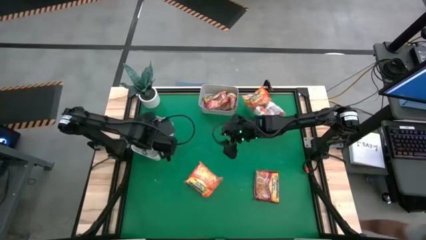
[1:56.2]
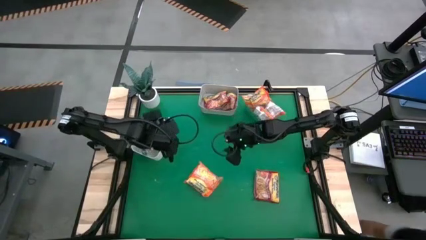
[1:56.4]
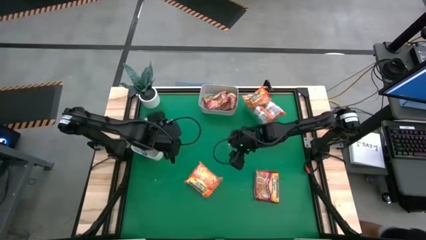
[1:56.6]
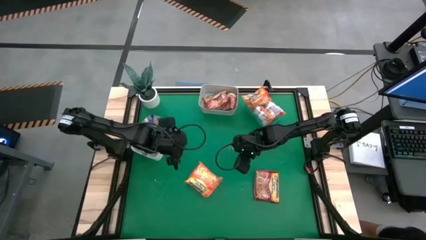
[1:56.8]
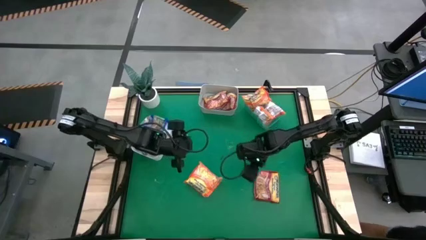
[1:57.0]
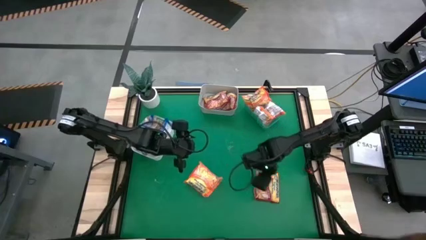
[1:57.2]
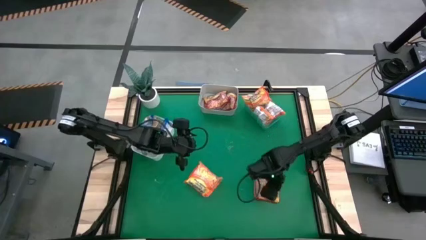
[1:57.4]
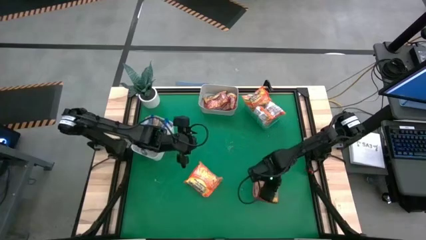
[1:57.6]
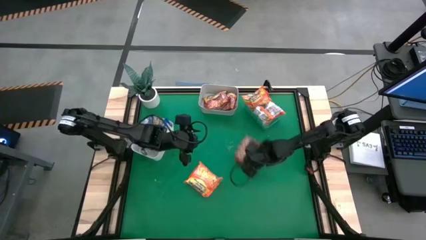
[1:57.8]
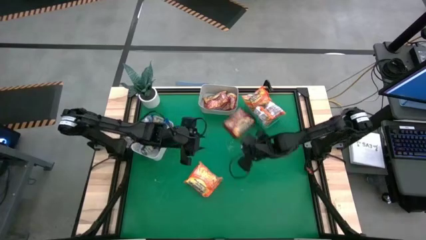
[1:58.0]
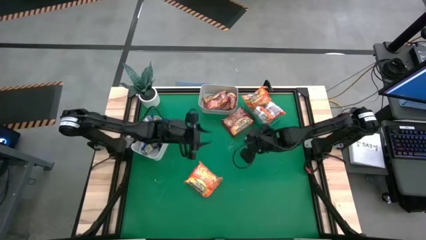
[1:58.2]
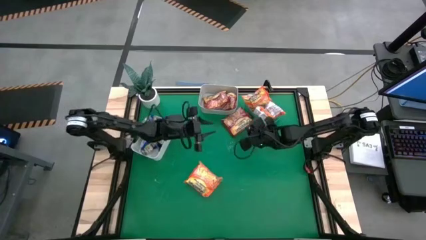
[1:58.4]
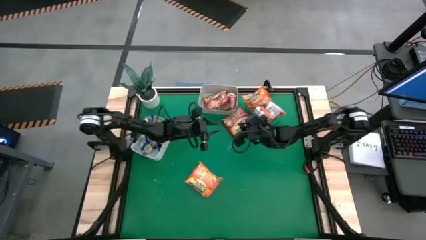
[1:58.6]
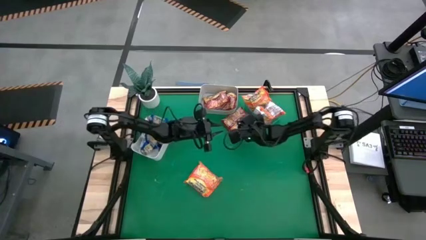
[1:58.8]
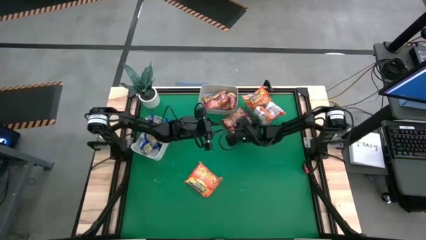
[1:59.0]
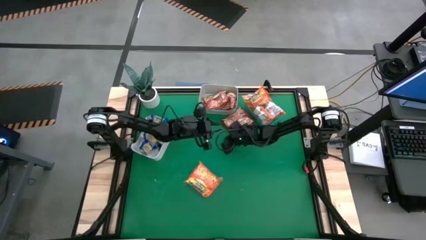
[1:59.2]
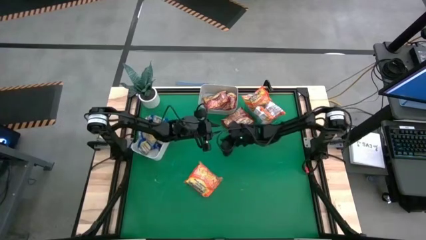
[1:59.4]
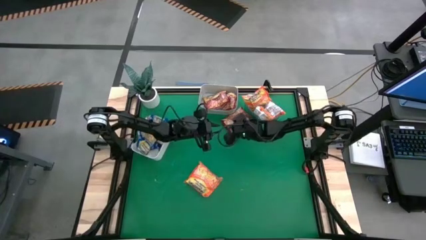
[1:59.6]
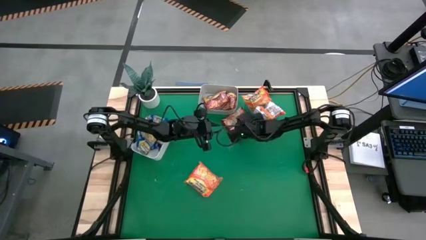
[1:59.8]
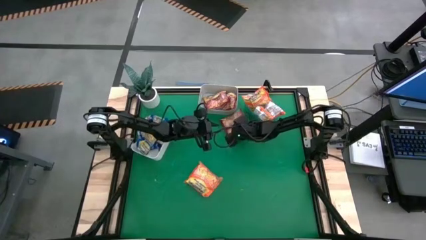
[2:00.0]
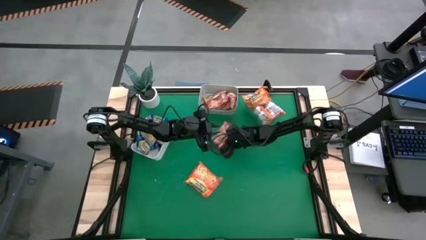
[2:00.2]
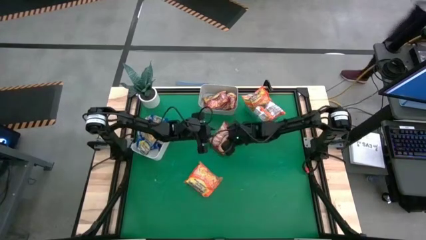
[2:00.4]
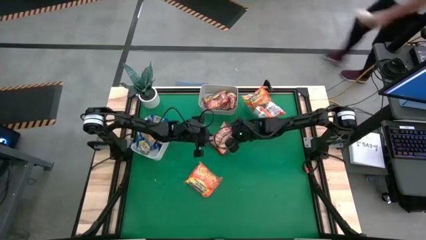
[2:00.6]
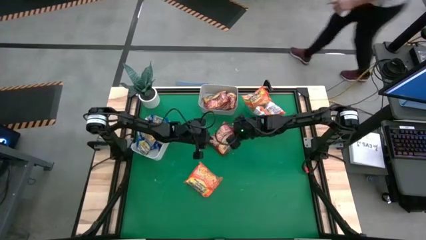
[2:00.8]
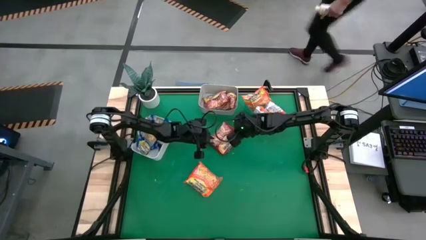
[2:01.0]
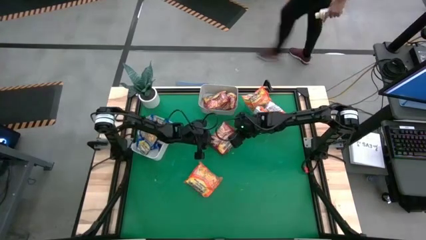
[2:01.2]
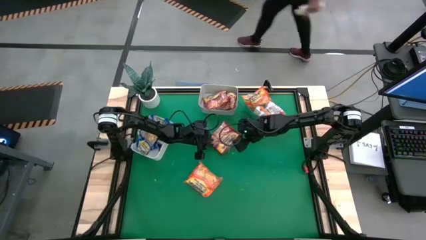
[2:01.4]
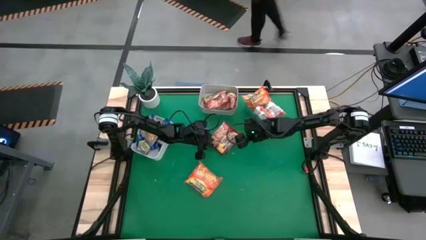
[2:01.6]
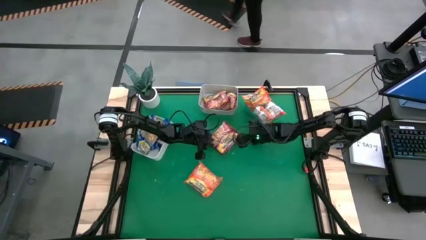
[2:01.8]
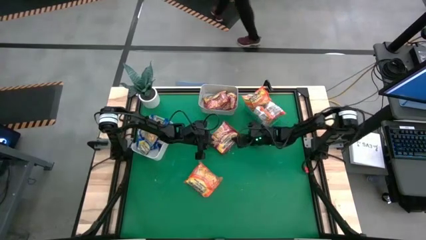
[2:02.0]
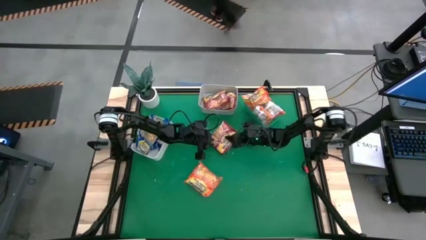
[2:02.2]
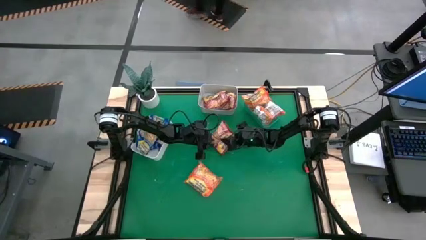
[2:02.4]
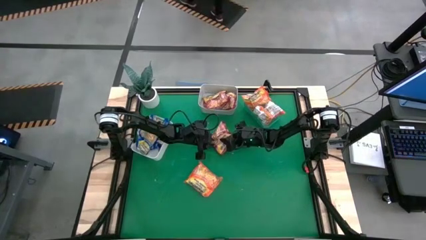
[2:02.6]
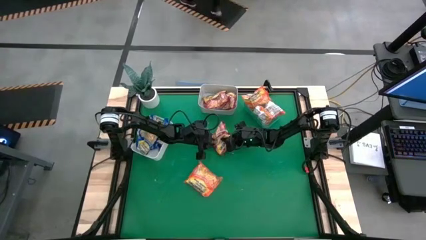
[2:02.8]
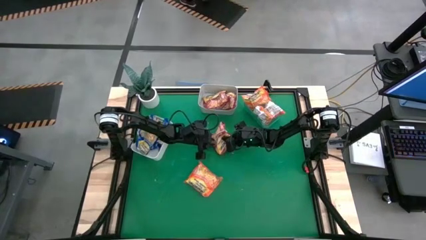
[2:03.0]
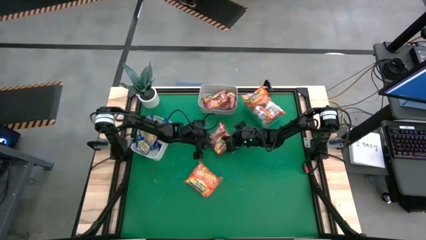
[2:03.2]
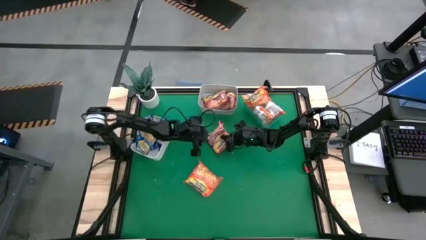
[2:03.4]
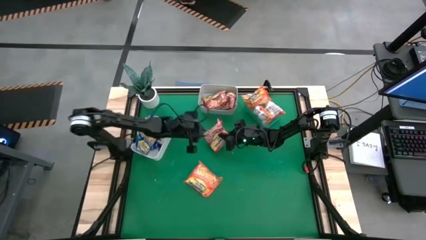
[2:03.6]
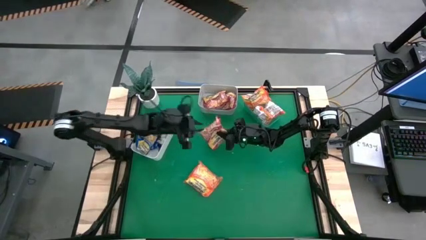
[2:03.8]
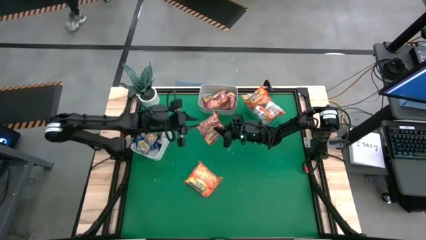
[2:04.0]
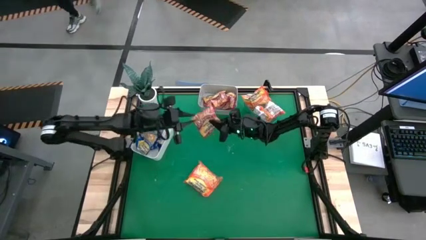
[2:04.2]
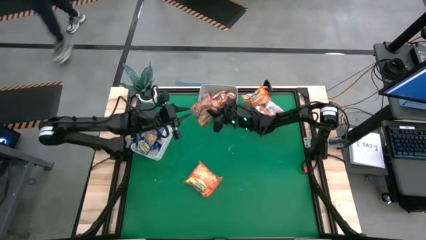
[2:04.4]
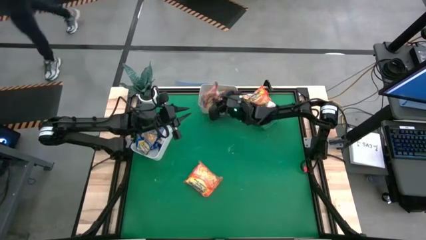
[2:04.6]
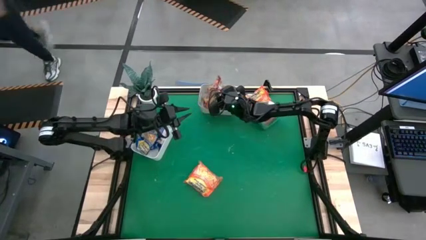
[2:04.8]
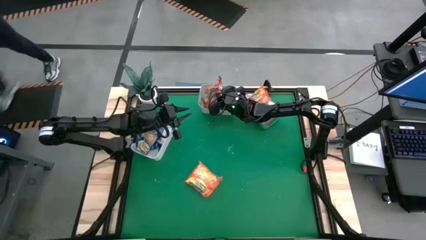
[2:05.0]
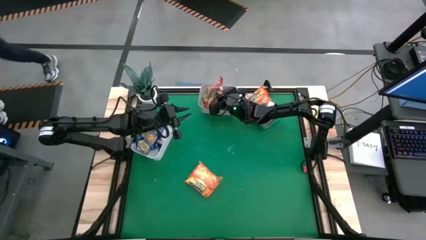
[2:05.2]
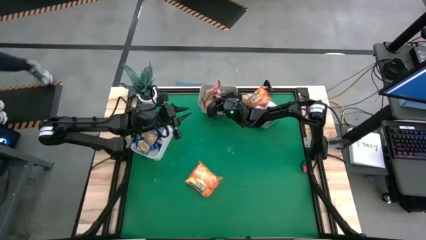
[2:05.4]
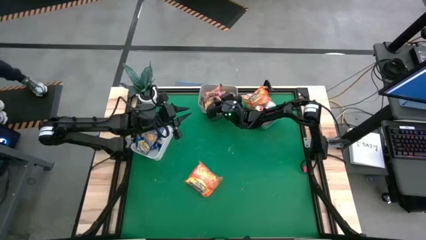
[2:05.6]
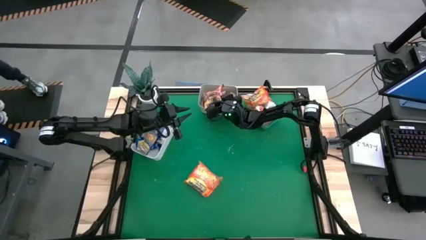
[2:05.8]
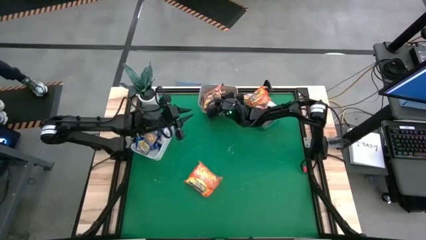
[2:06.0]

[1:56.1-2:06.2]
Task: Sort Maruchan noodles
Put the red noodle pack into the gray bin

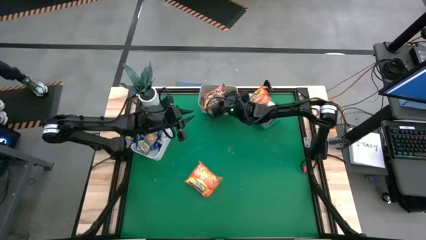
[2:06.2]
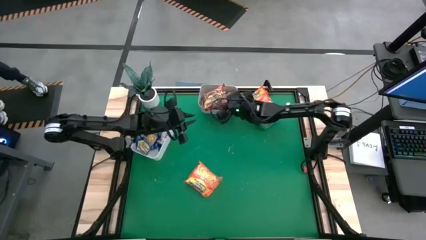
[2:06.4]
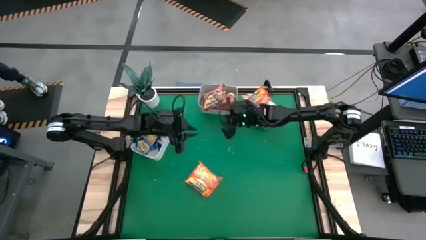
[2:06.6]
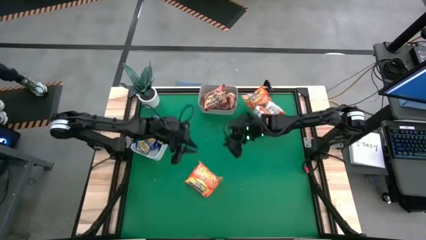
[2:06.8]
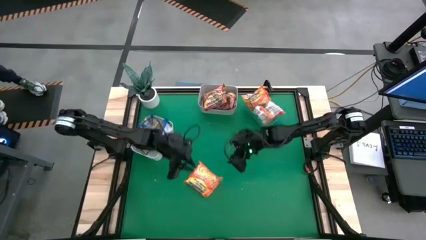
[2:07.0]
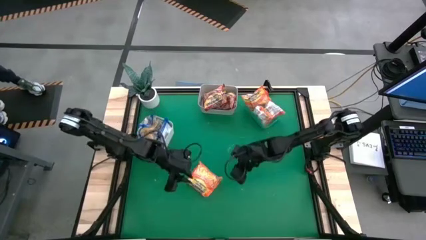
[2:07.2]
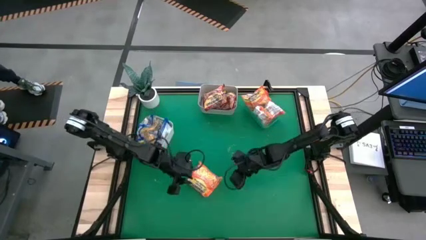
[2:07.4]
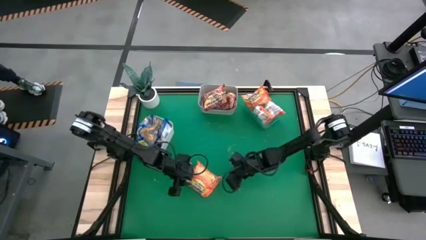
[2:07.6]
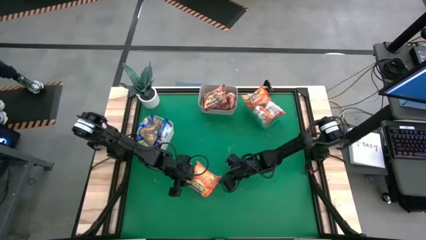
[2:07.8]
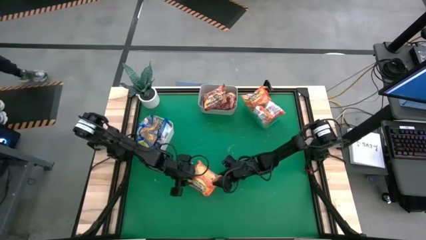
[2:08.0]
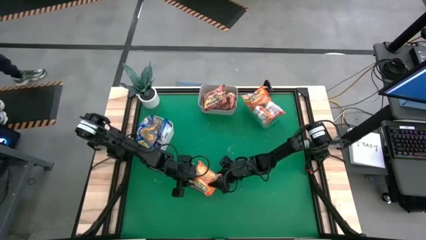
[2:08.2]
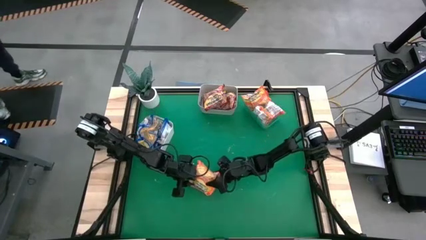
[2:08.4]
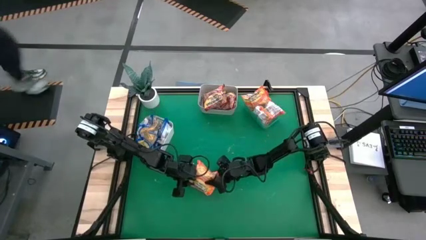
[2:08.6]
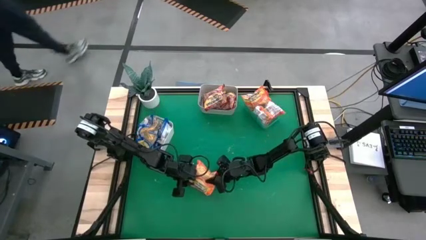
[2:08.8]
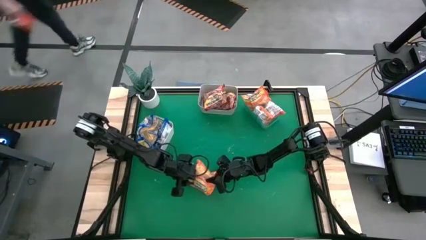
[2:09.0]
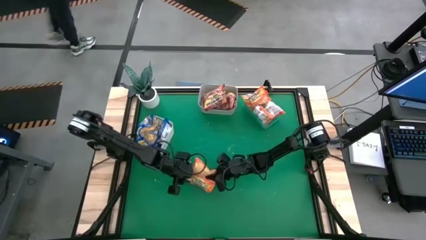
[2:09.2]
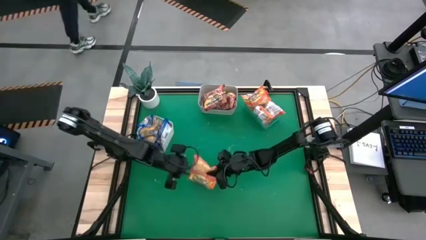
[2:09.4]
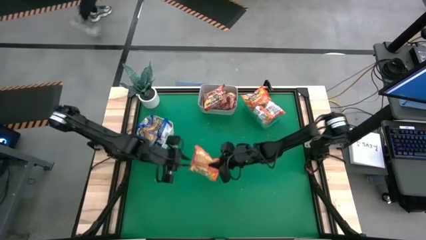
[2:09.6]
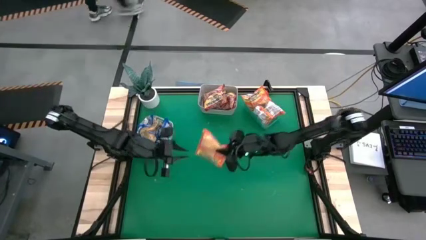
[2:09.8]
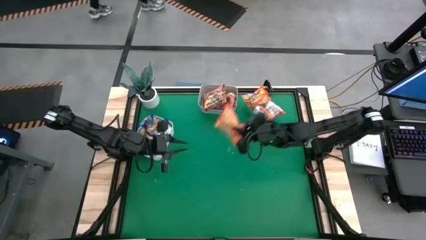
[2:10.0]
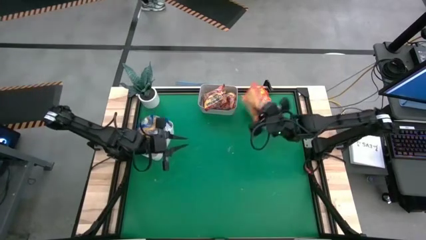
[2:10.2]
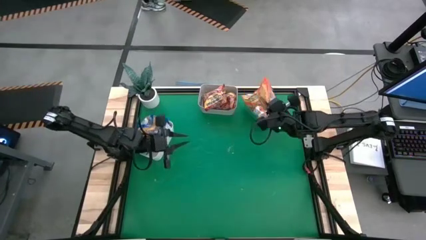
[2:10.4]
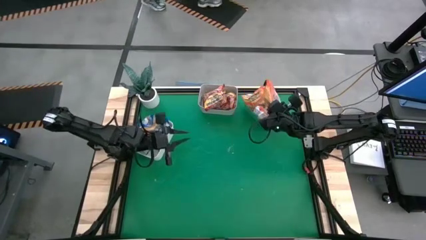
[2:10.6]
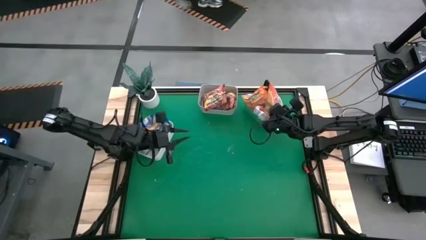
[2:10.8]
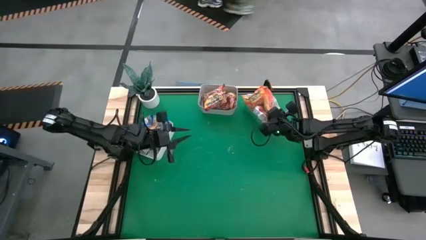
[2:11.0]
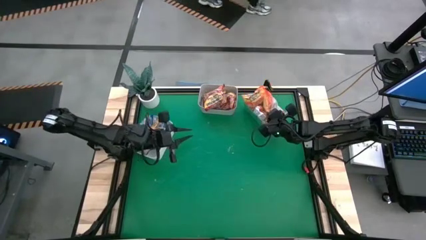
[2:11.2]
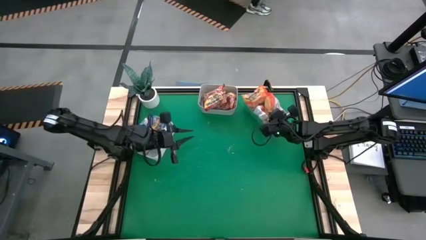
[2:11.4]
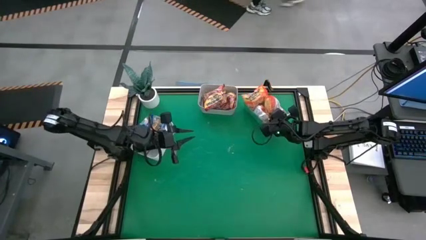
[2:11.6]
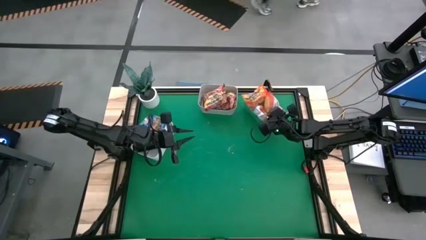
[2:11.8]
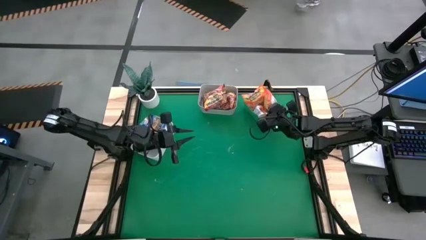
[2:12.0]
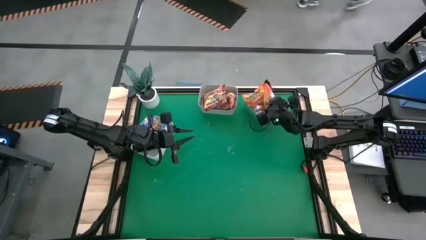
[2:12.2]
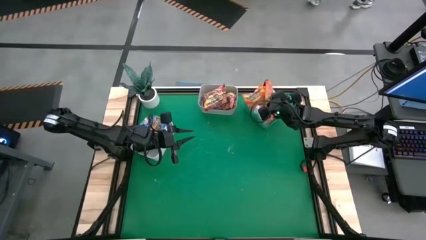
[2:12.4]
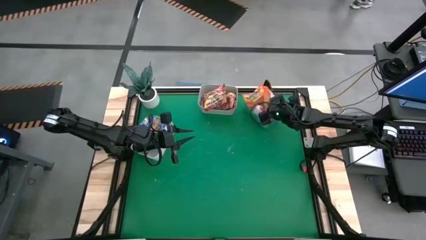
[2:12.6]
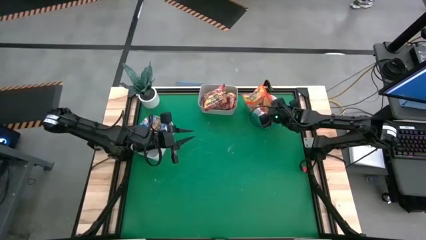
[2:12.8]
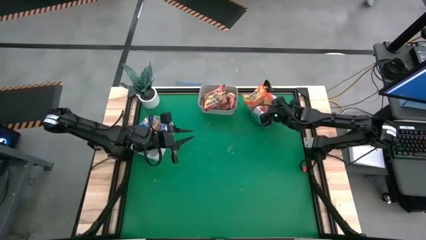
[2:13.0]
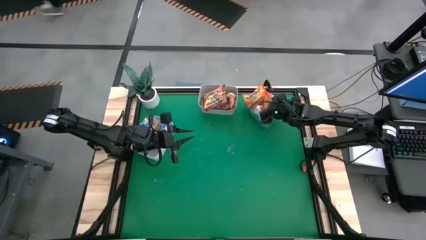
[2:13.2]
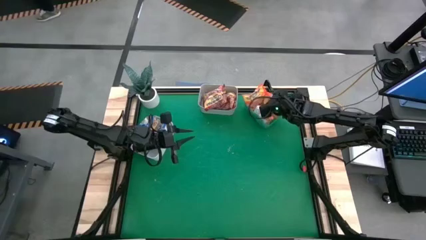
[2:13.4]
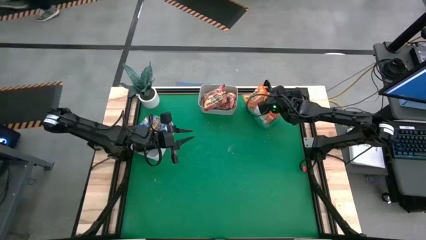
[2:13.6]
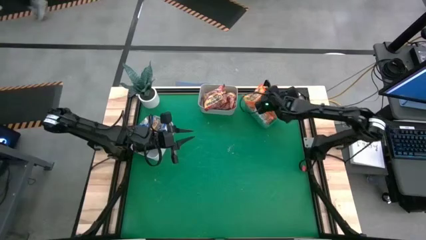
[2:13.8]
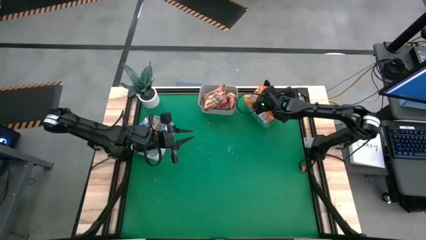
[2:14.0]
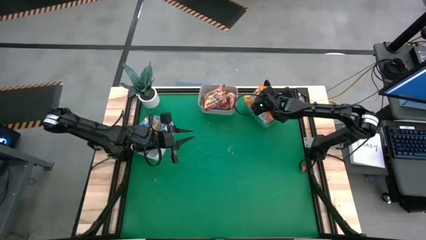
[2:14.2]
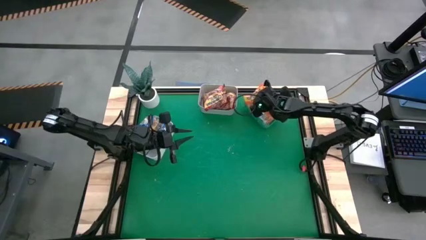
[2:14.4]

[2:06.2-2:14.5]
Put the orange noodle pack into the green bin
